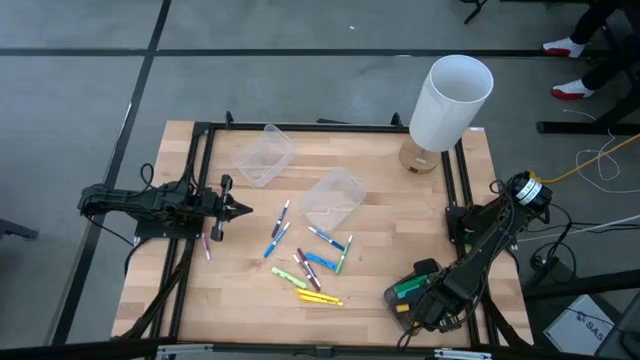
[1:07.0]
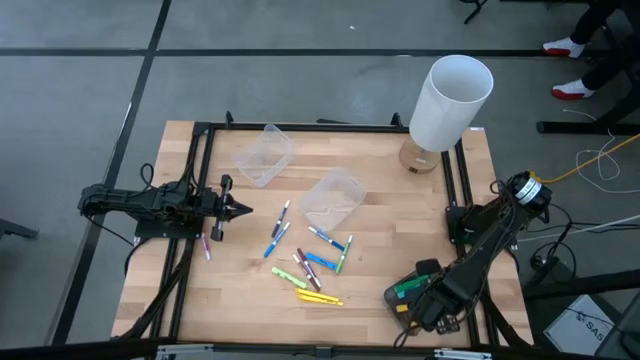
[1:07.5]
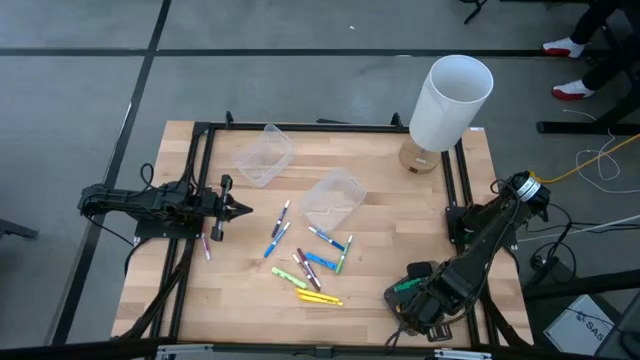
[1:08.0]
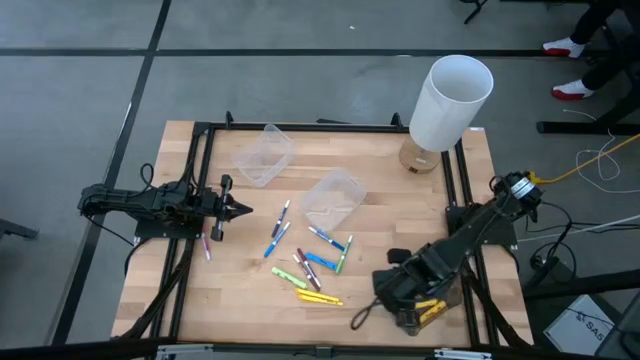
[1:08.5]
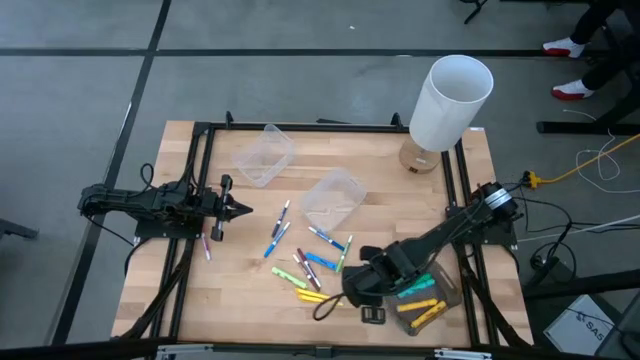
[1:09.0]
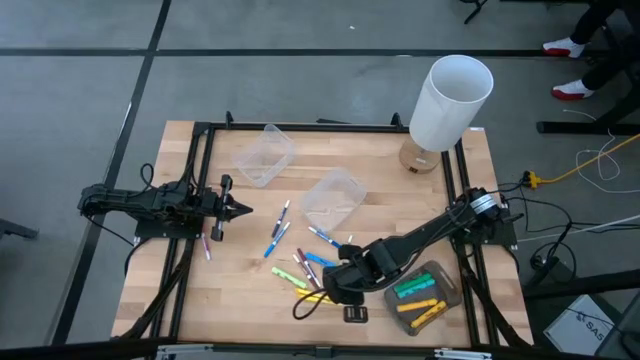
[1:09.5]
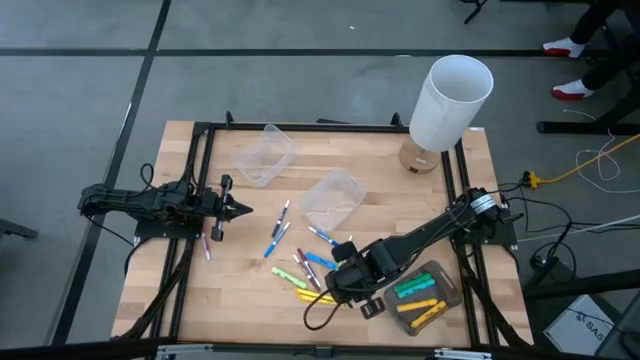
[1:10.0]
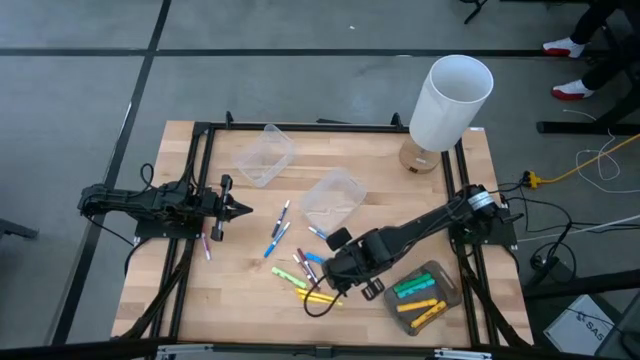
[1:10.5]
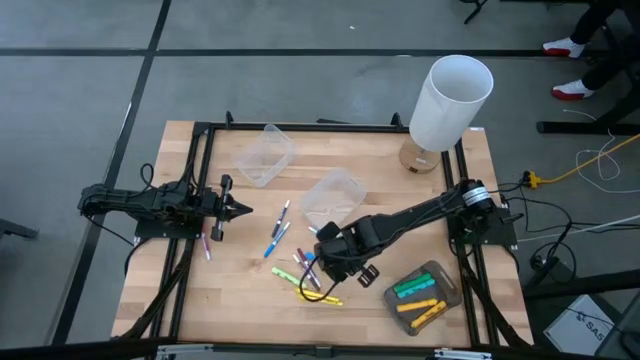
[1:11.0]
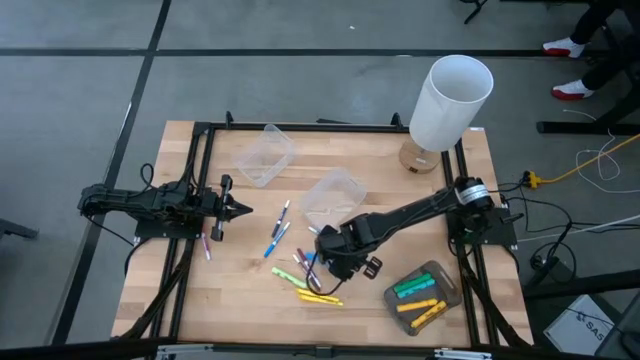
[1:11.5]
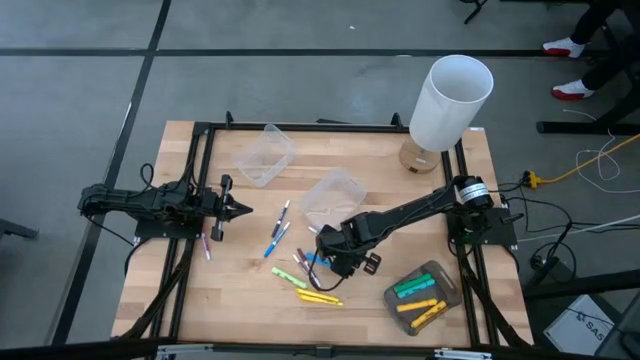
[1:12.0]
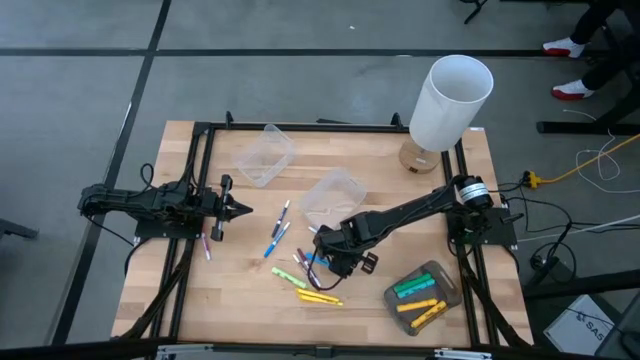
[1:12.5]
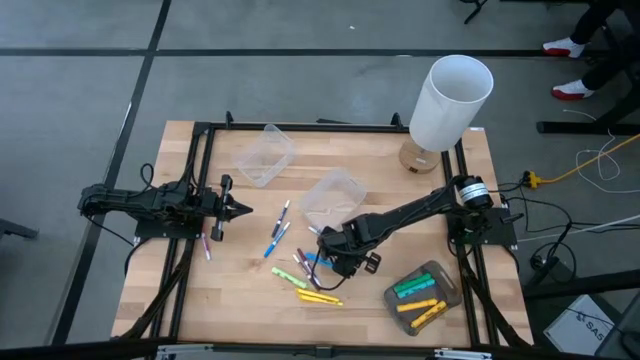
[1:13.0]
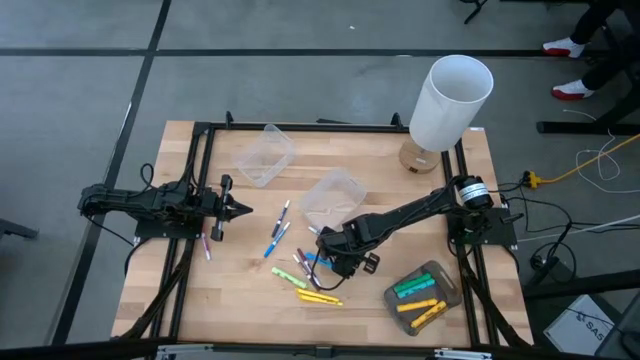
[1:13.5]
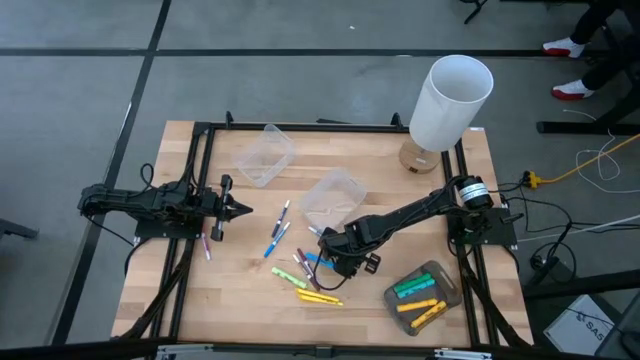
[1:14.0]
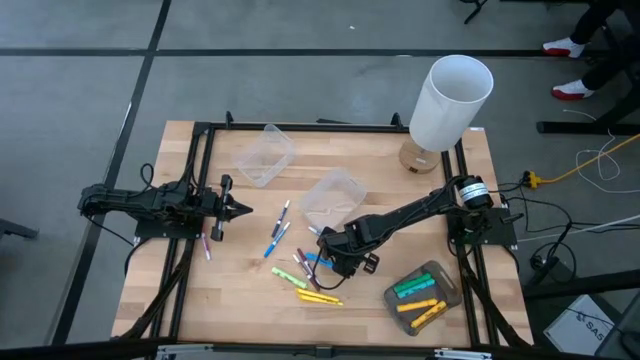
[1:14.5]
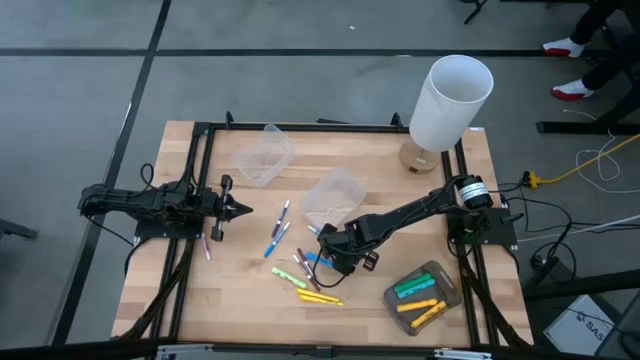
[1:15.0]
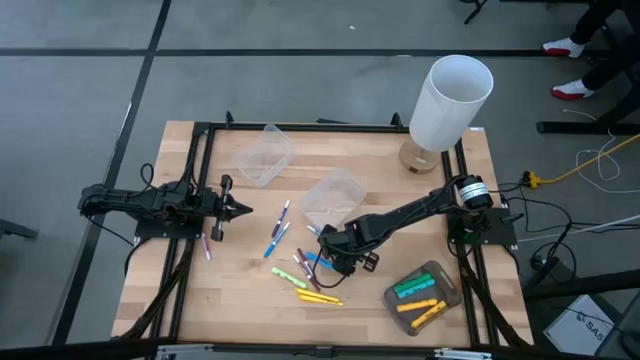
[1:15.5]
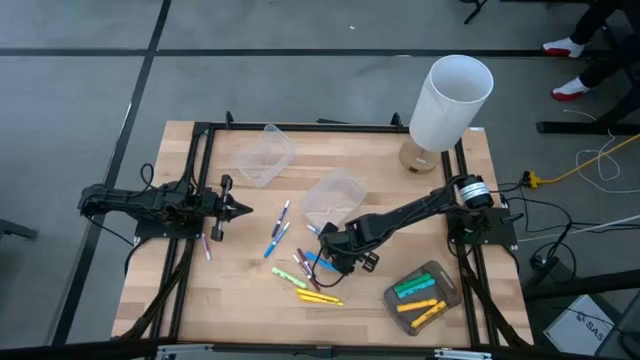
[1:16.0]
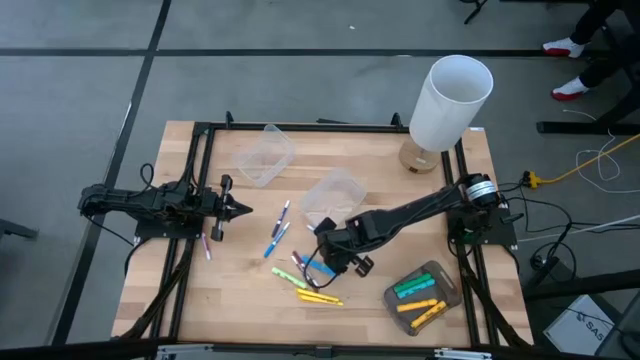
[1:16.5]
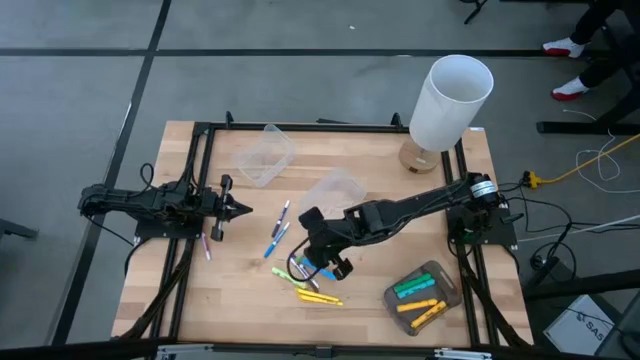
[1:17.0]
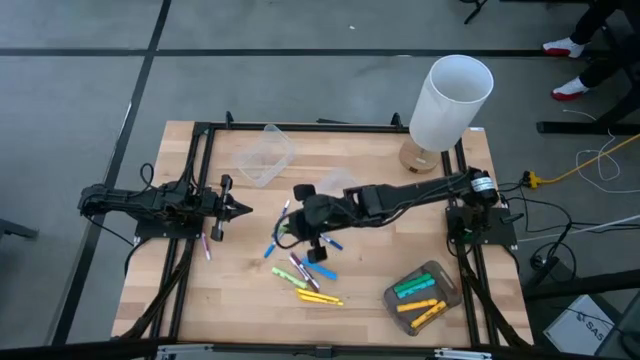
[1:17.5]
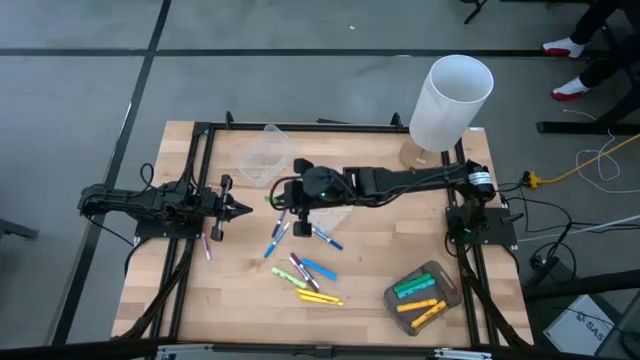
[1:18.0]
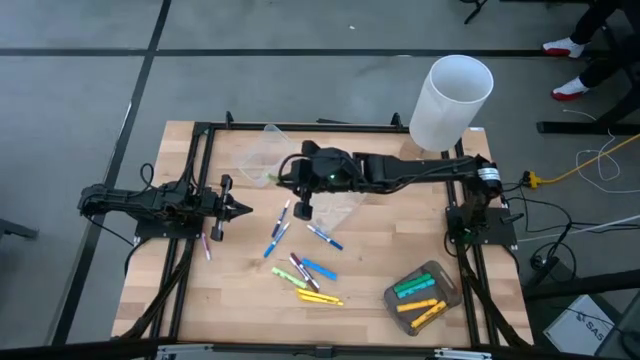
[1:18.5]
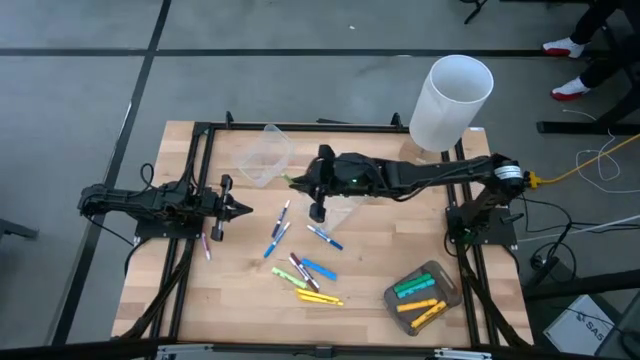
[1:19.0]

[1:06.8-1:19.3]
Task: Pick & Place Markers
Put the green marker into the transparent bin

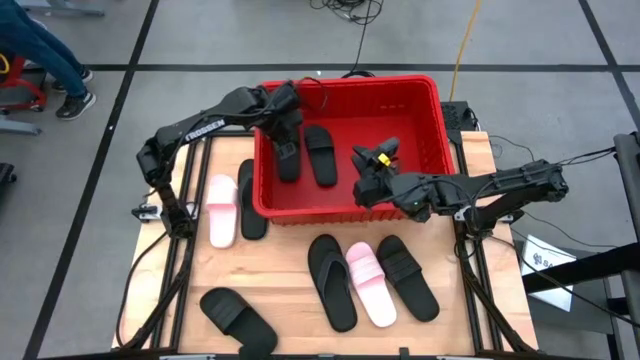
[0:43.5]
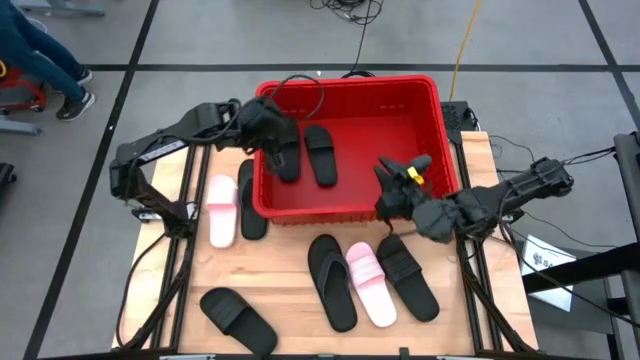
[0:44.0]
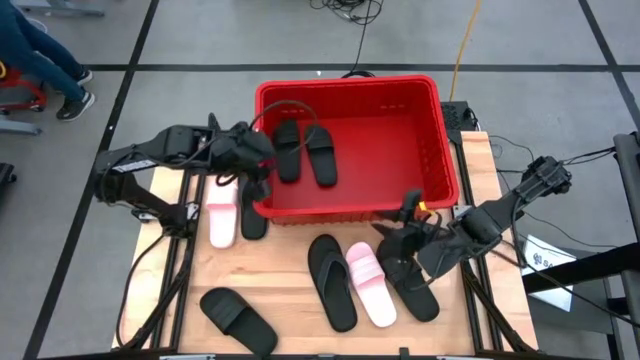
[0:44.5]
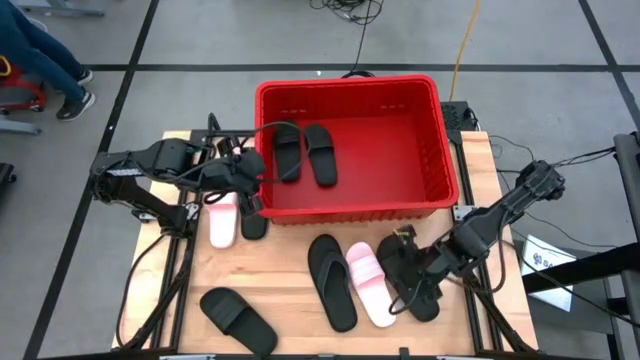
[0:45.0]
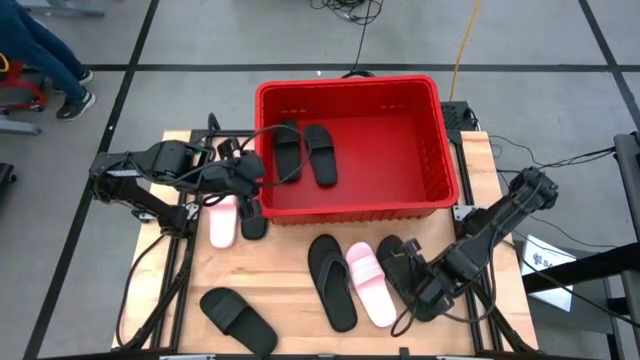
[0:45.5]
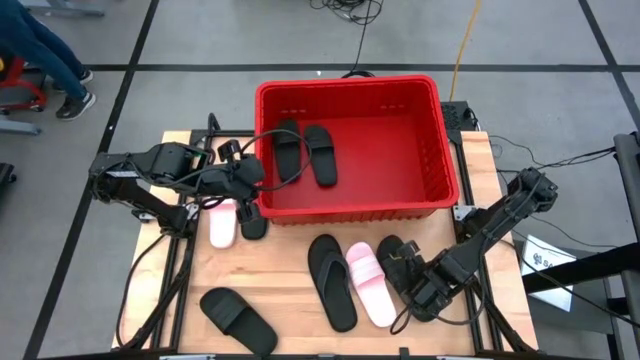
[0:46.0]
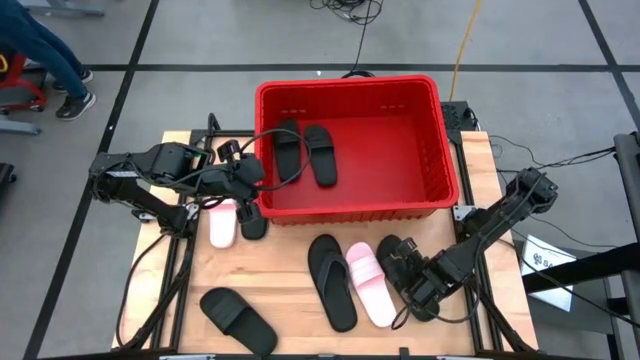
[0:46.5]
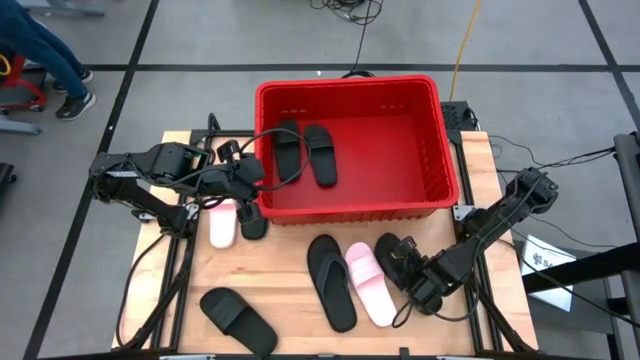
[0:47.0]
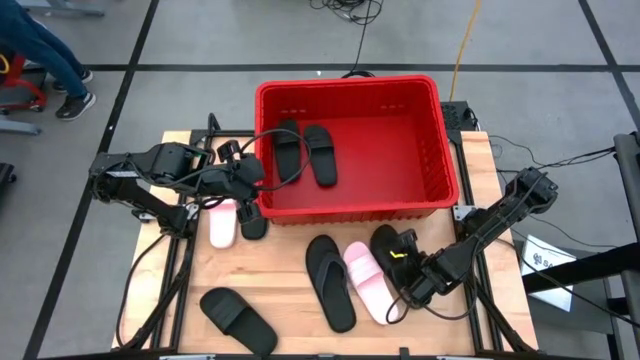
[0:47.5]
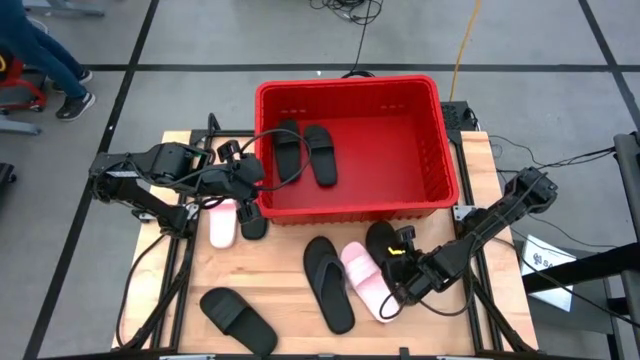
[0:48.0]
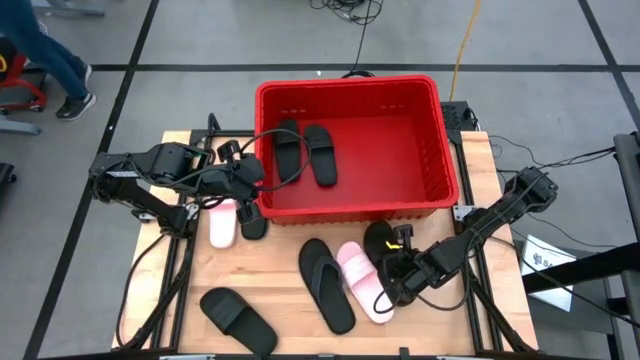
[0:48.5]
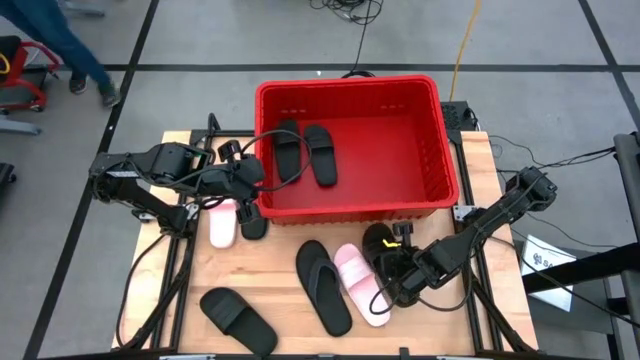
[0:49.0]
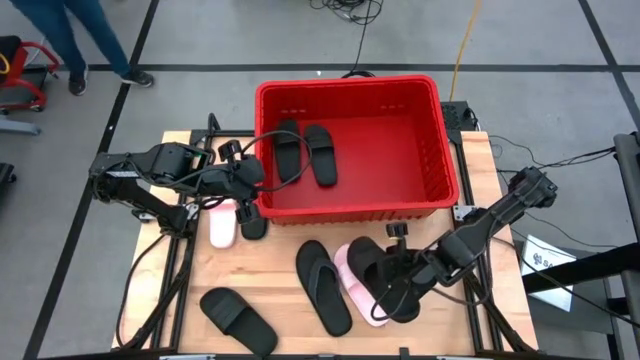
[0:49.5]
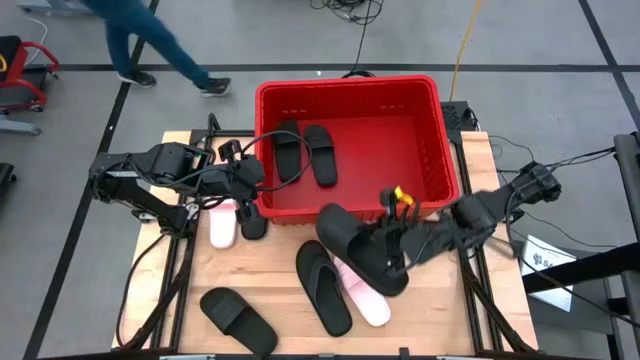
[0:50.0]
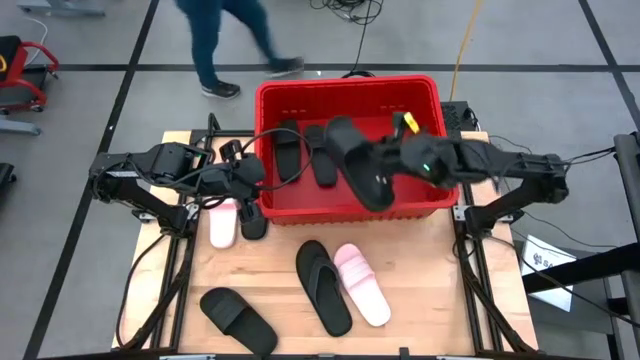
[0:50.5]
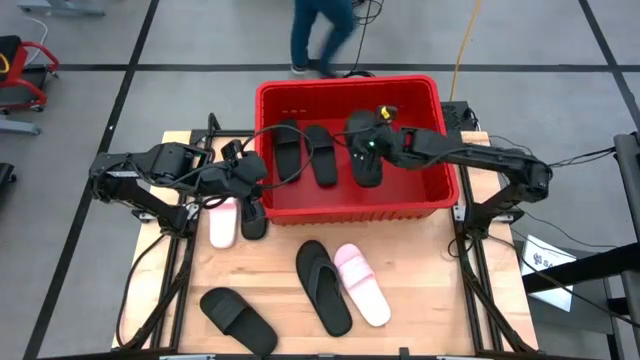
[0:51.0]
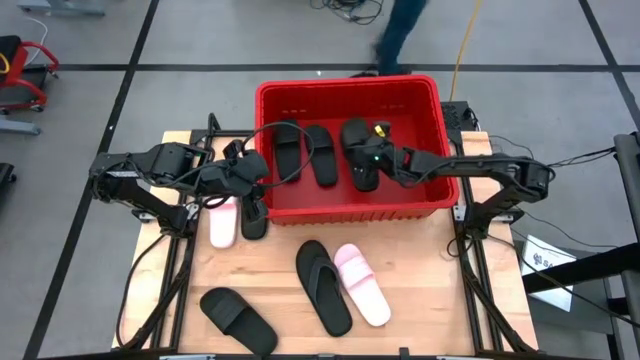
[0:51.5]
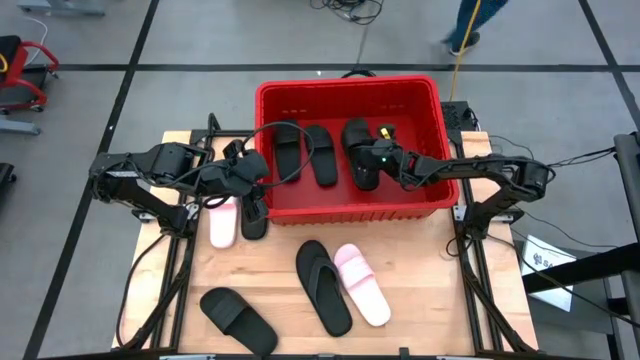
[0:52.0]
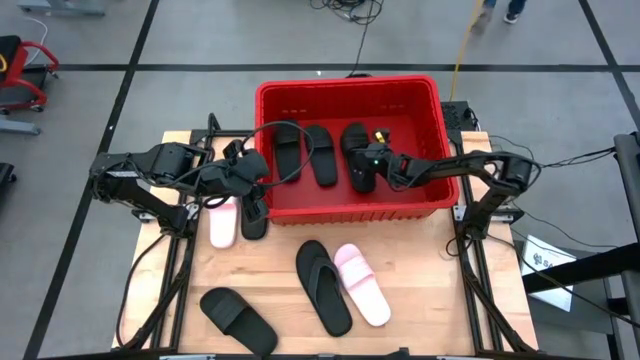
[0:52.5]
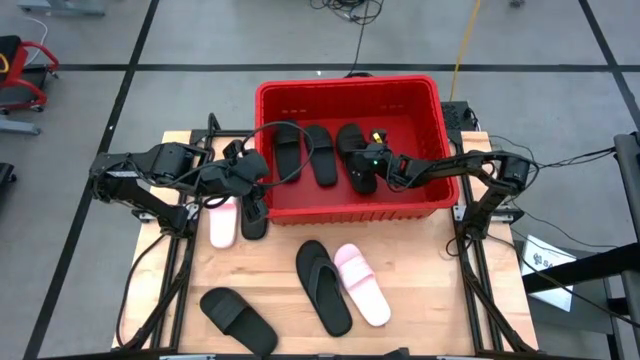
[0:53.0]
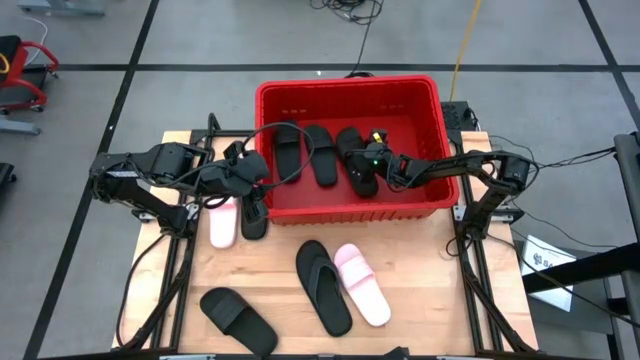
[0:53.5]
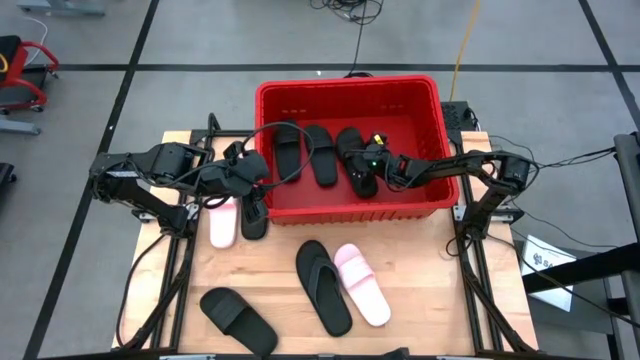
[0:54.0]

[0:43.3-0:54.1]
Task: Pick and place slides into bin
Put the right black slide into the red bin
